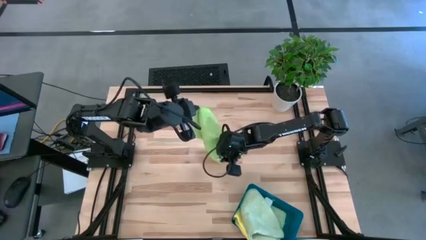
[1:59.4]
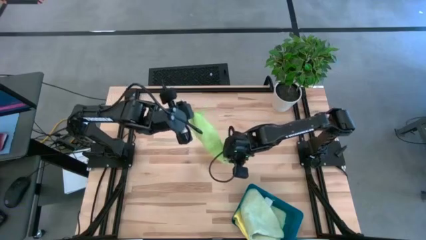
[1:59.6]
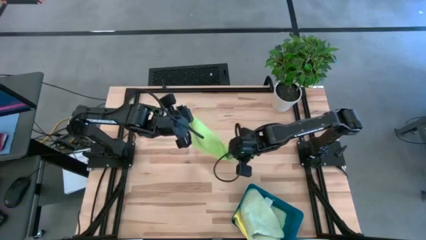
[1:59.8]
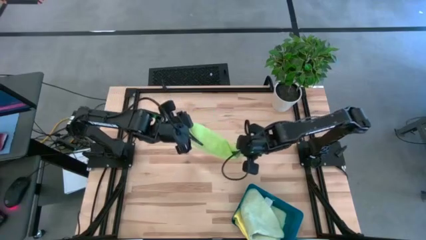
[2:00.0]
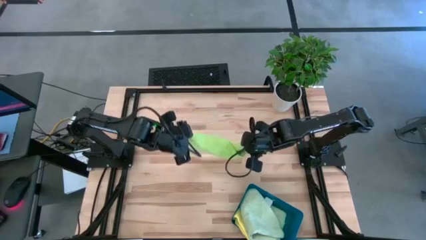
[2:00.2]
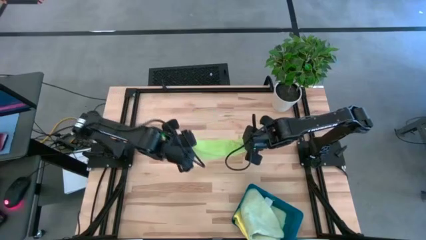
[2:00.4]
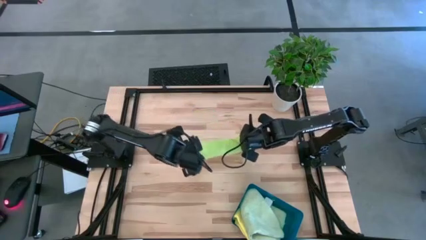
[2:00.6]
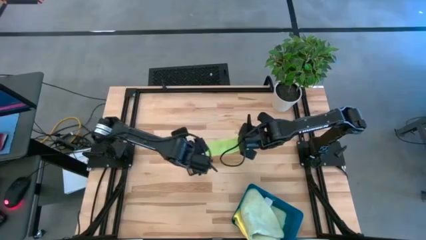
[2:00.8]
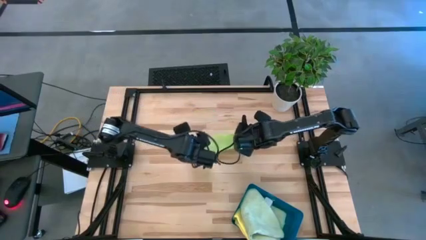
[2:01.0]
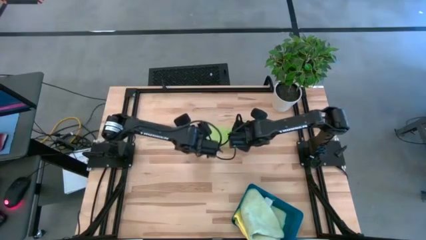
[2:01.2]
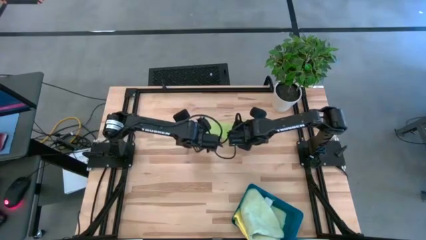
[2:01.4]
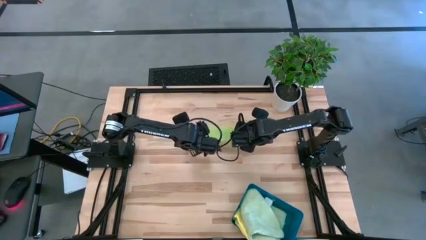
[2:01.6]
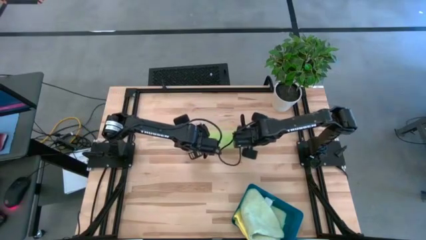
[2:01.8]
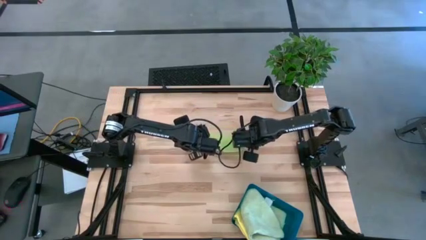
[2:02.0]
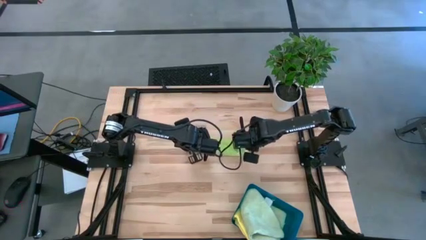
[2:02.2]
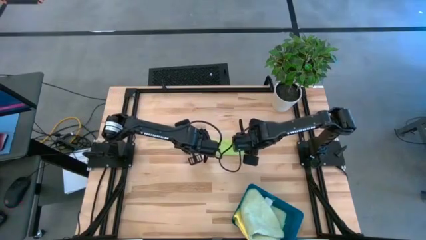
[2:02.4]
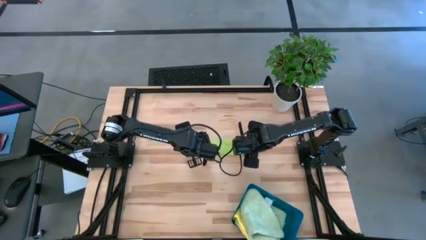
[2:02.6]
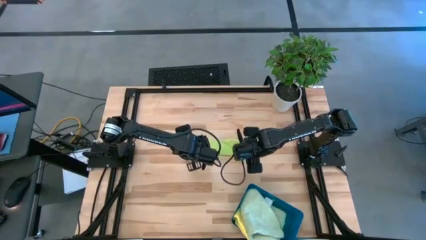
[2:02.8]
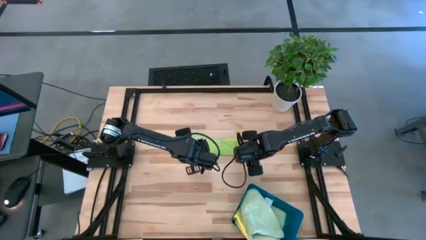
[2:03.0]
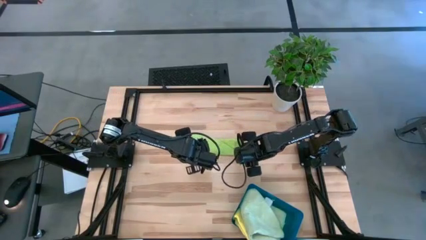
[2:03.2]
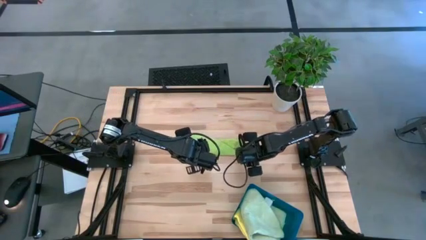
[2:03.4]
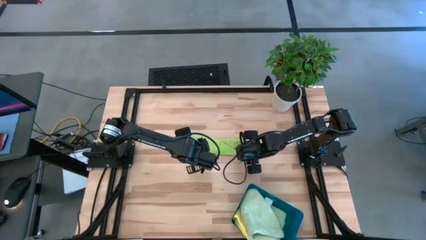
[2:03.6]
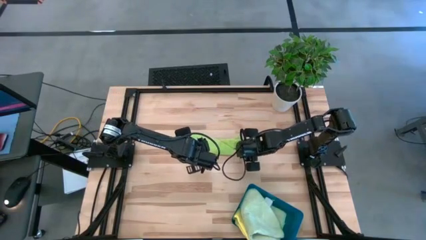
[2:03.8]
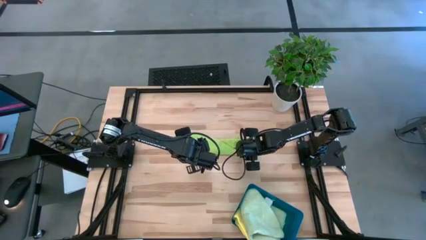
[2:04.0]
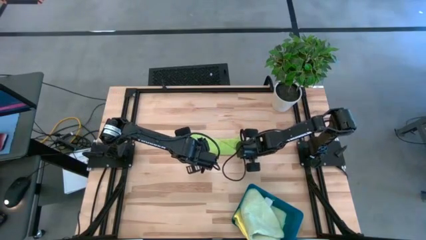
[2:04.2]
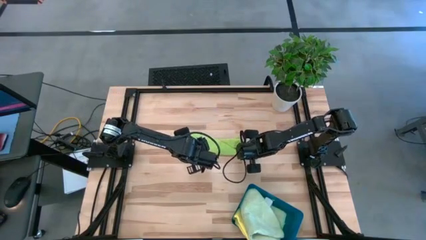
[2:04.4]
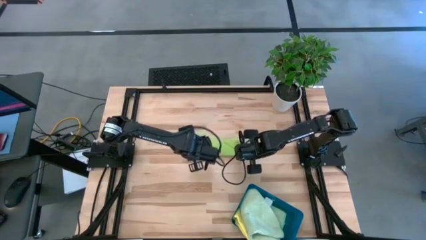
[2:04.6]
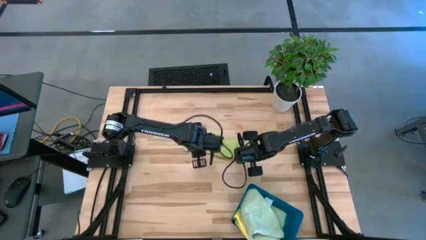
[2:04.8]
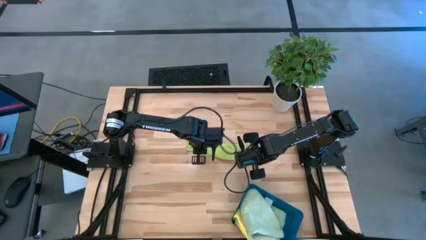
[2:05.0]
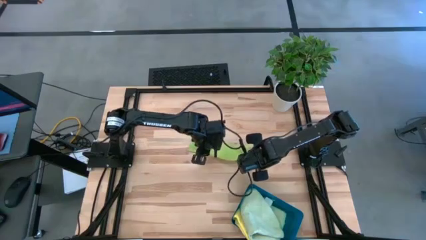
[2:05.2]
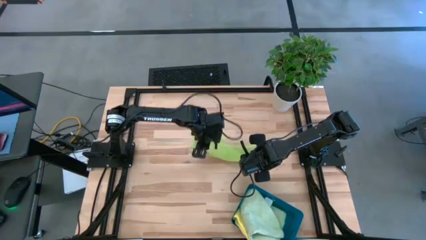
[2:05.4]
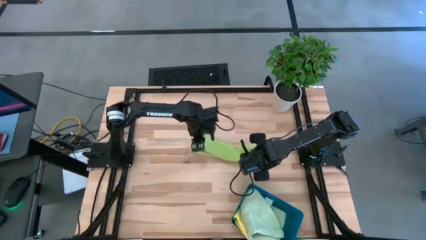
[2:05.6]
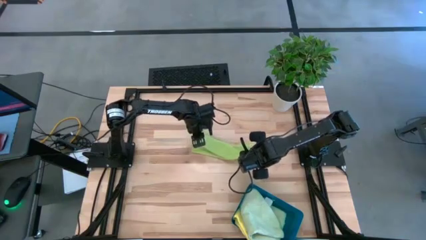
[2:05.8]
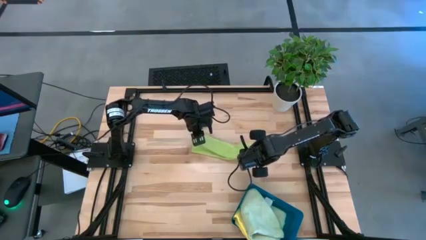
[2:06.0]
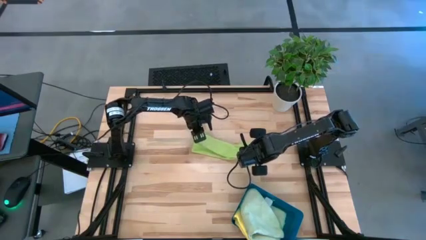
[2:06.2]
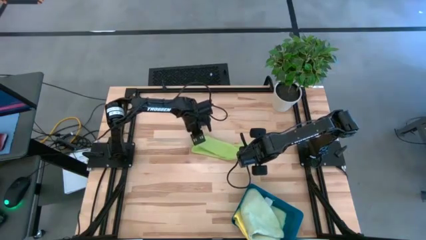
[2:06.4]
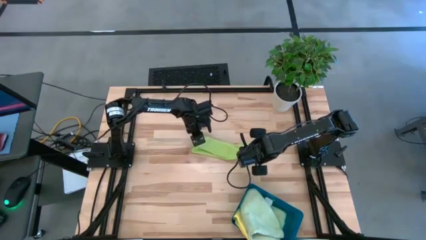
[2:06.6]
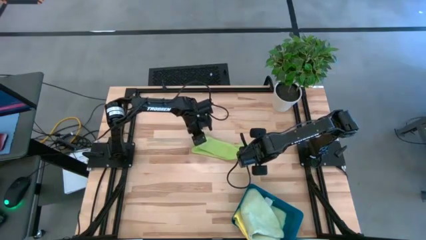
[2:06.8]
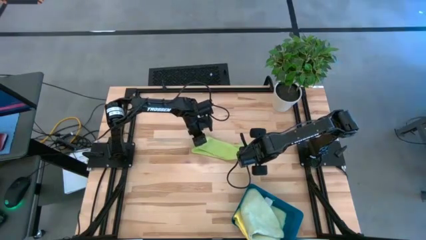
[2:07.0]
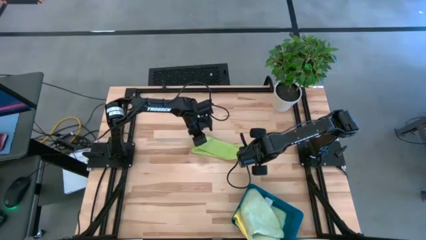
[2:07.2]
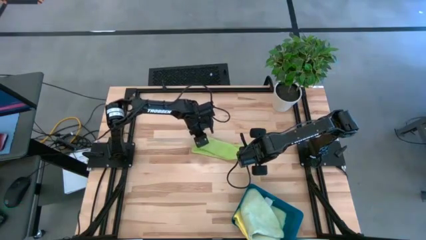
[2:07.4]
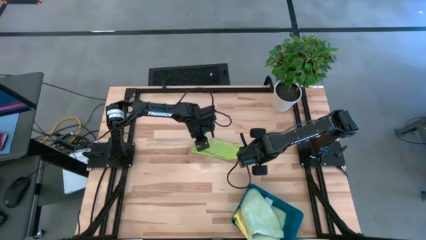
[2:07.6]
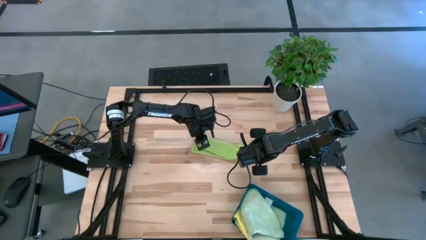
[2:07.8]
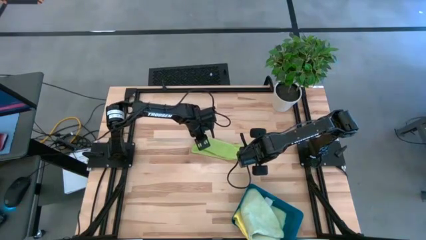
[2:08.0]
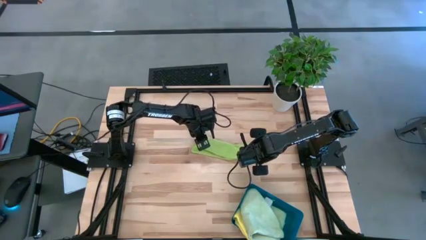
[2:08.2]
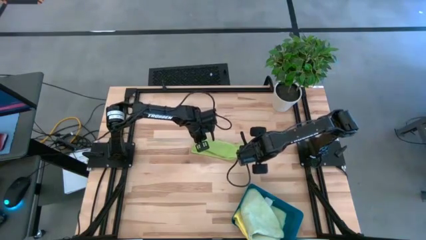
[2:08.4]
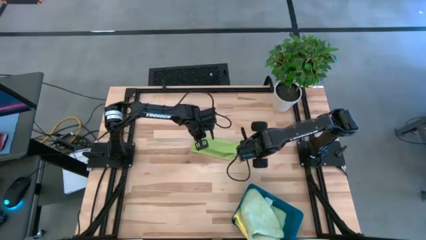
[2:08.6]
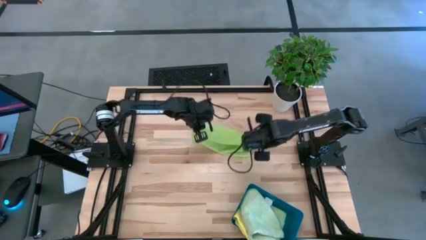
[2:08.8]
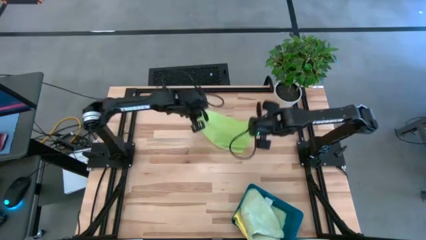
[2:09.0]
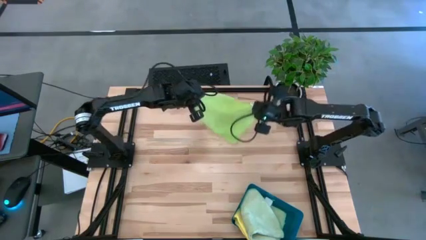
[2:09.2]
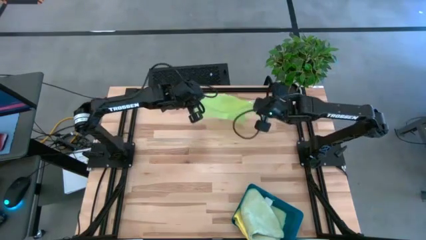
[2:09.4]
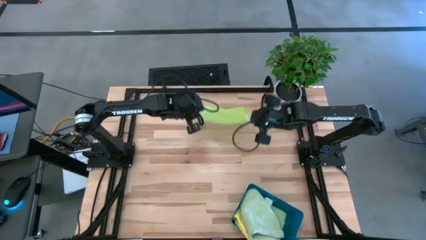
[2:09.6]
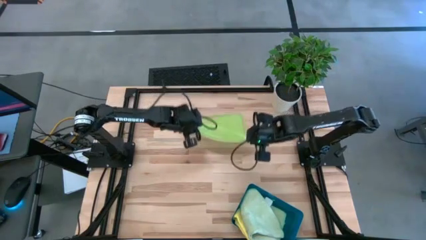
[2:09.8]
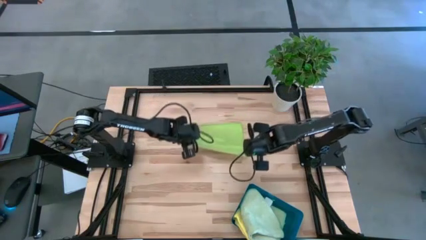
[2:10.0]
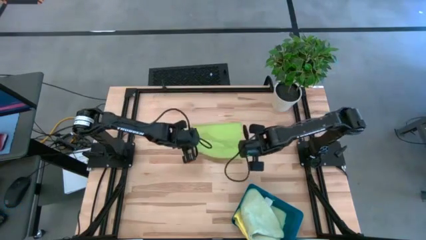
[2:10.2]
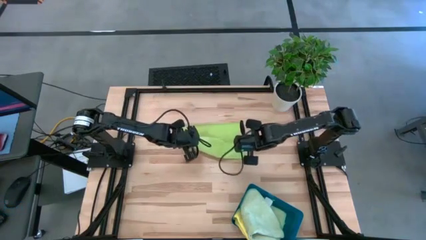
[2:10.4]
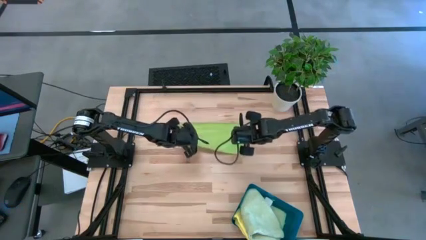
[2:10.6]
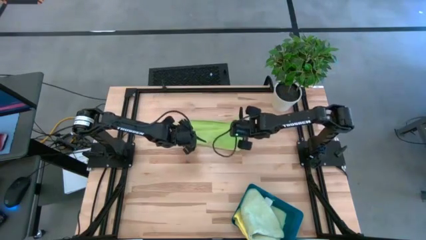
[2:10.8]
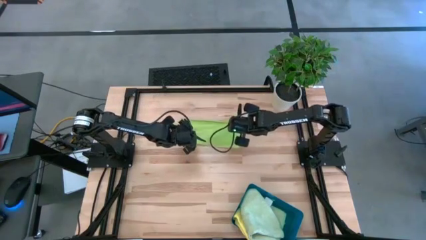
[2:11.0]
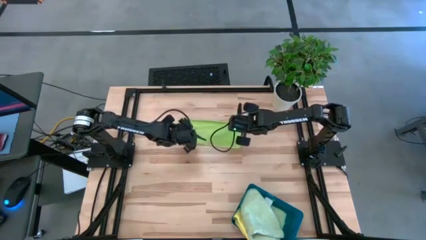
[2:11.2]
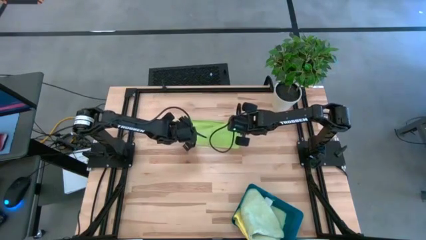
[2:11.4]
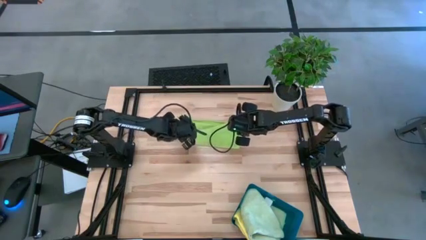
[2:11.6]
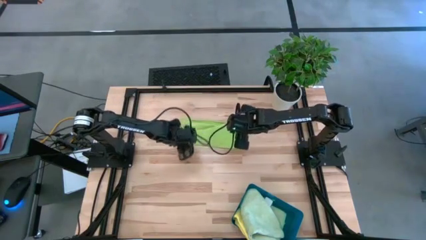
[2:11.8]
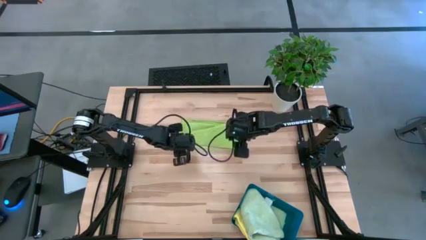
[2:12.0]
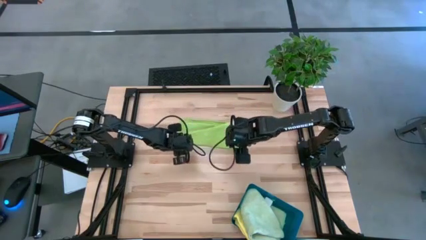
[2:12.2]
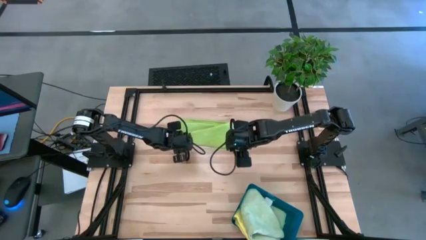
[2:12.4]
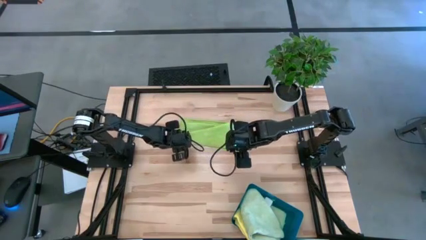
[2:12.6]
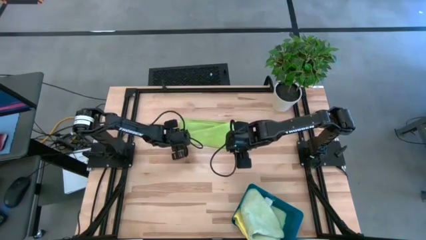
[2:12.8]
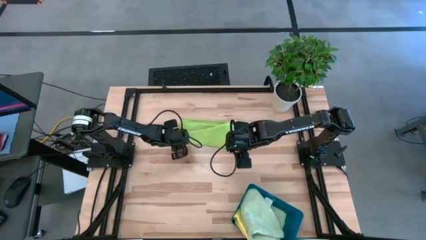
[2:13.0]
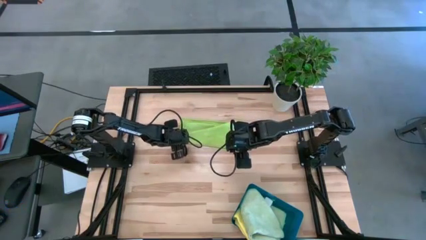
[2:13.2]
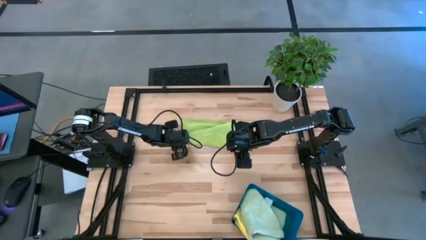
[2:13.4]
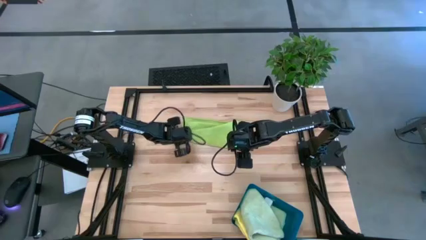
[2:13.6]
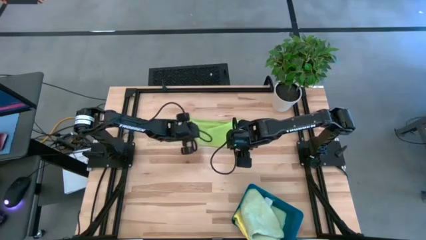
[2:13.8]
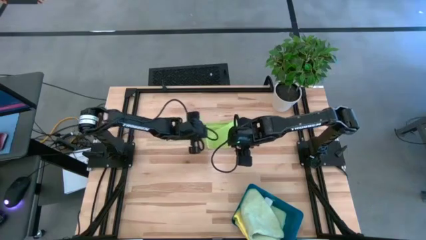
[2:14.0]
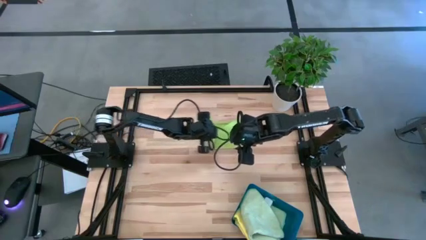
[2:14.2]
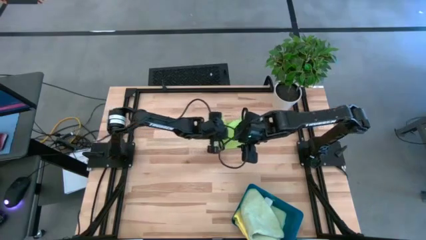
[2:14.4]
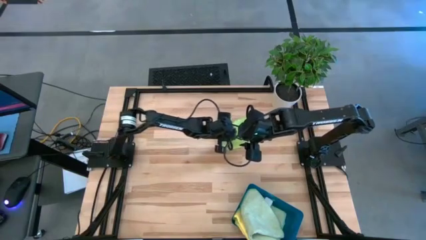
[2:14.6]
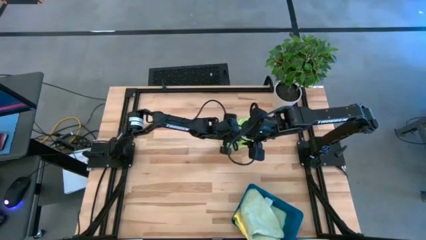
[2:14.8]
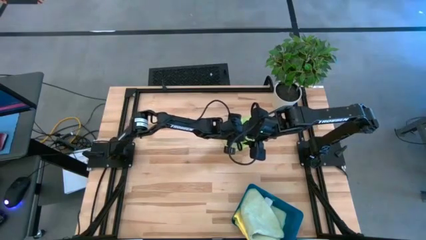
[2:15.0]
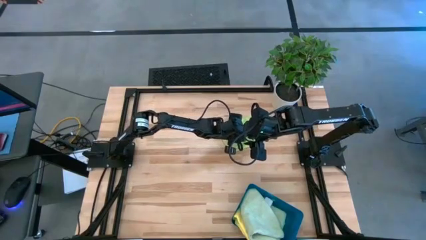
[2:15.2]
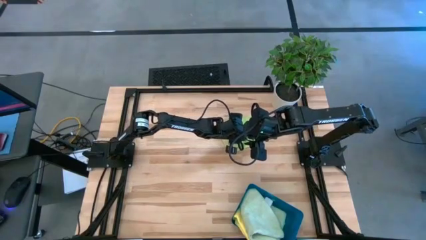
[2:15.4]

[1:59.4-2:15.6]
Task: Fold microfiber towels
Fold the green towel
